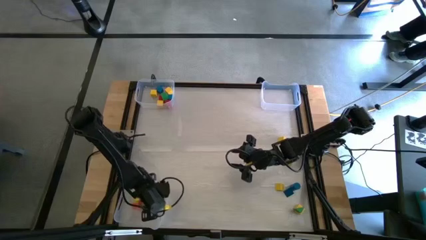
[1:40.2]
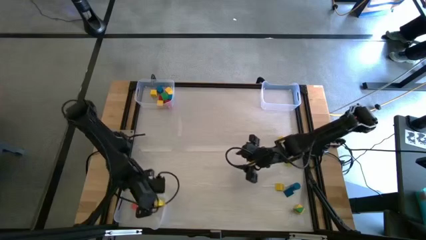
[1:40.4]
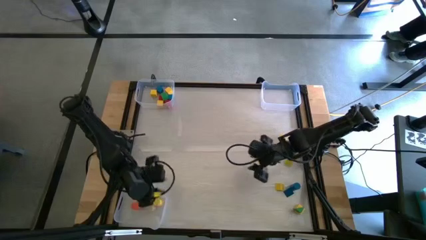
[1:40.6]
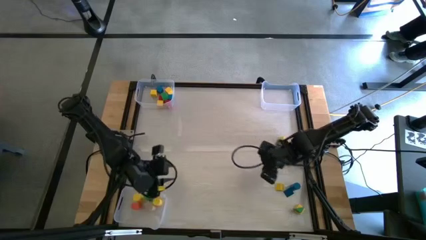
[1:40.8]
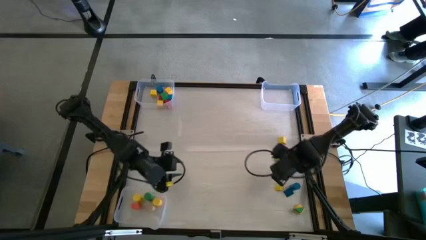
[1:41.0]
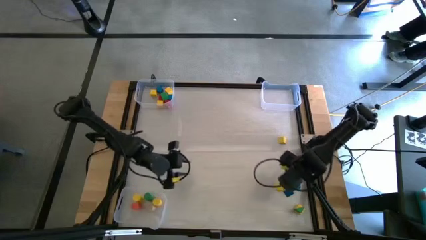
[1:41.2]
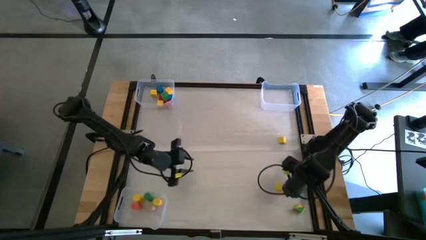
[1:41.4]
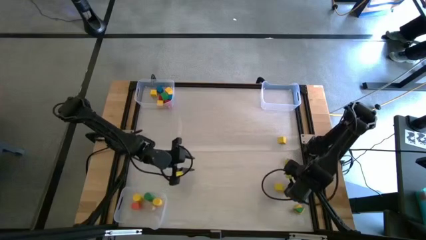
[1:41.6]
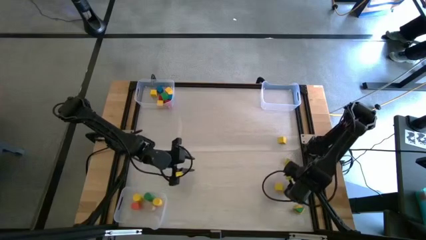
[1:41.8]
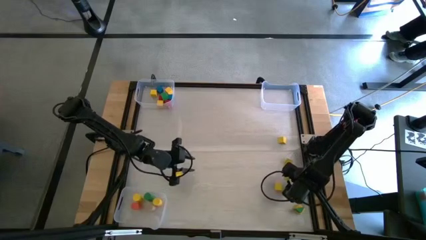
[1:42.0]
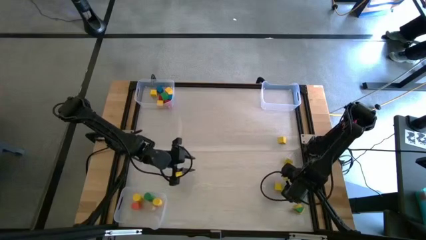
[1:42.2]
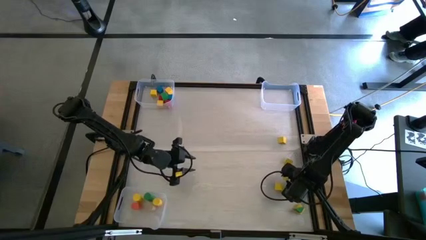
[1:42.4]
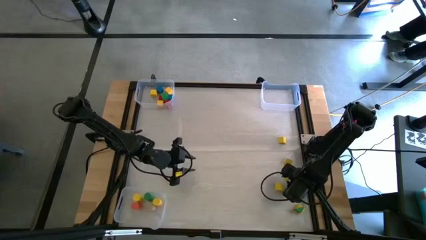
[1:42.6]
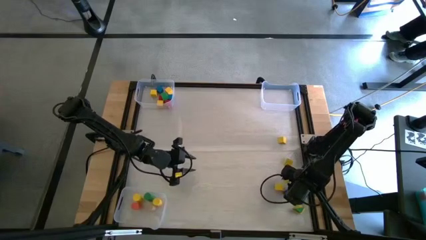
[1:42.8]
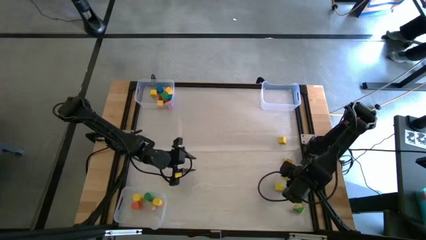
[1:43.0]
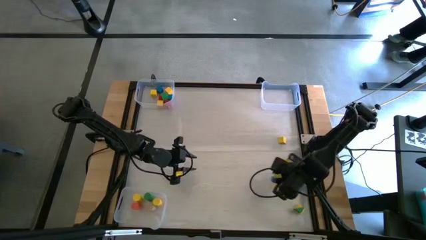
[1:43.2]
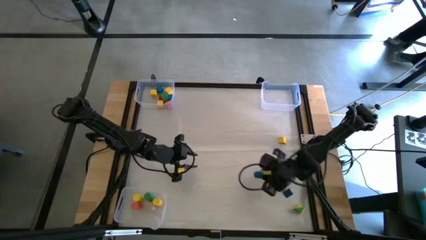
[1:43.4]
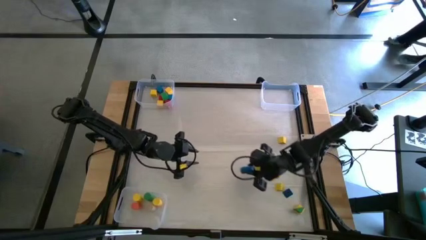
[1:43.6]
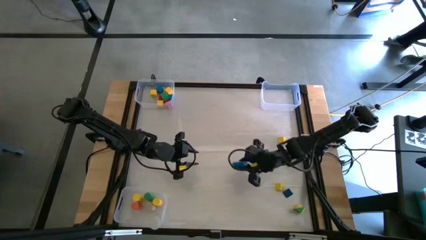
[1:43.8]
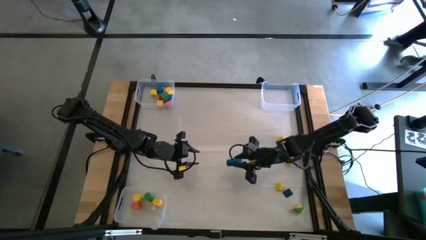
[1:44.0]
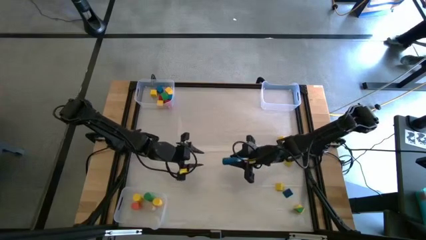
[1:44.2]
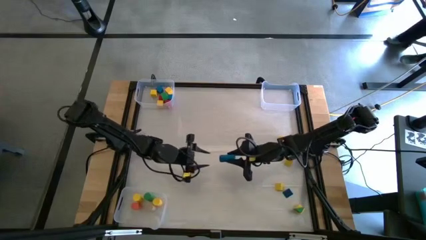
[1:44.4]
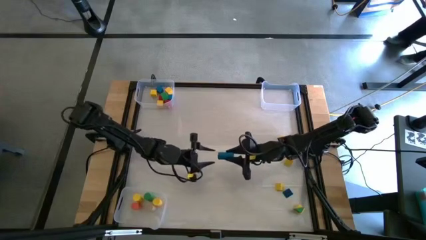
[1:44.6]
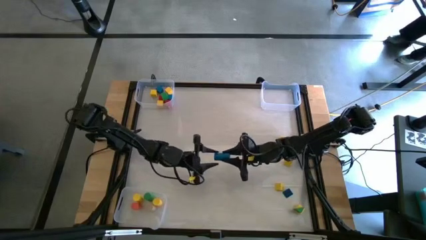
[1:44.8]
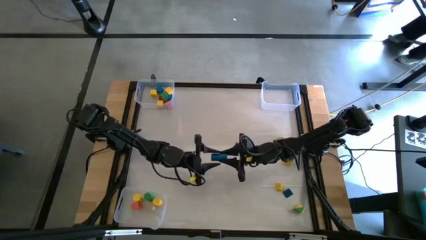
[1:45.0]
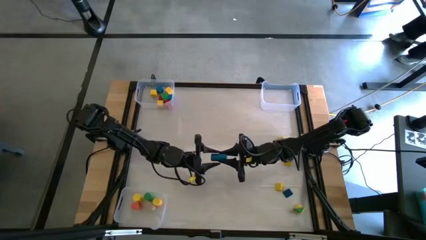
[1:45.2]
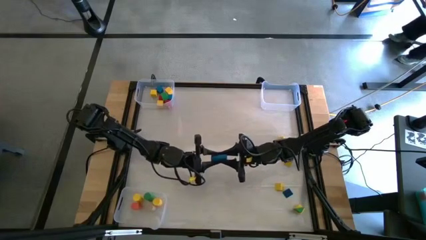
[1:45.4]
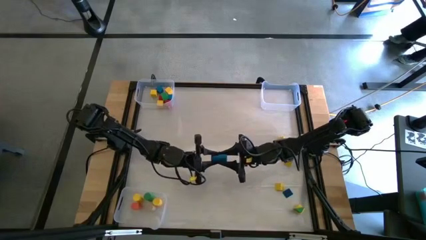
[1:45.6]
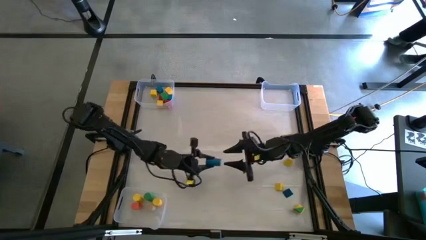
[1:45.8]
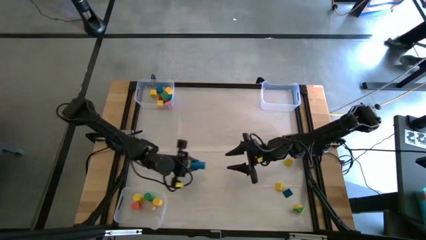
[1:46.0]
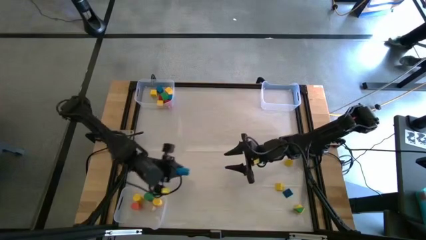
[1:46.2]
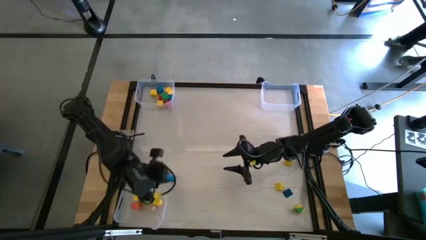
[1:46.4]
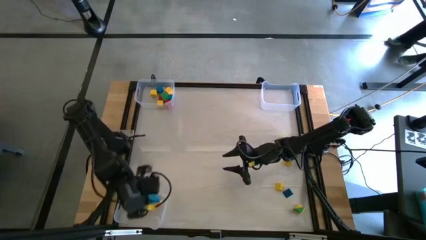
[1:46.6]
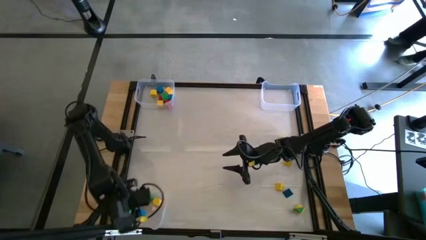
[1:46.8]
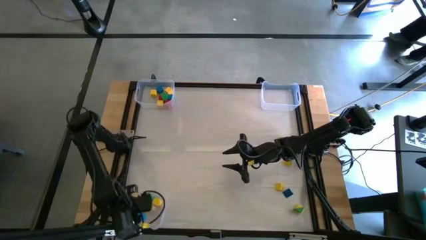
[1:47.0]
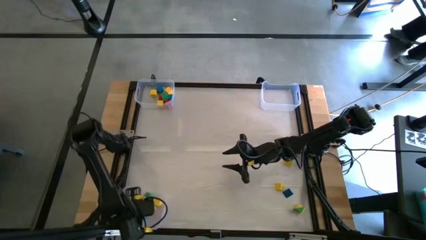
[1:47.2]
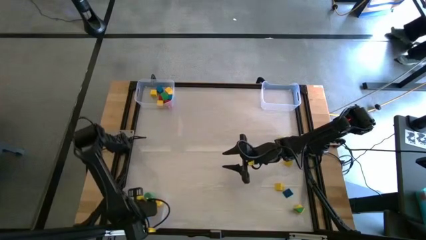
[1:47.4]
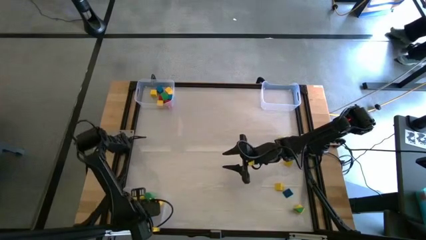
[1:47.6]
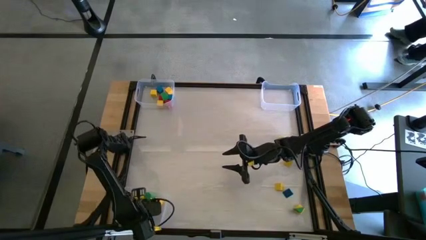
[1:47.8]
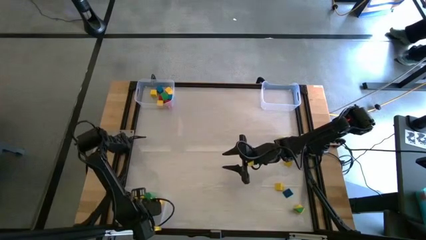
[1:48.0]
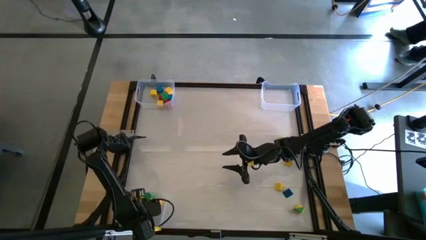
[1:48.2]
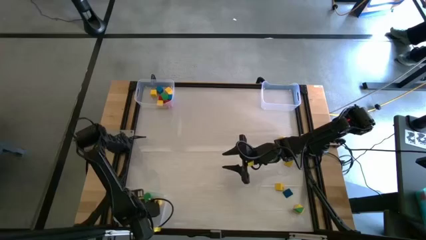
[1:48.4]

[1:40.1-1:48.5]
Task: Sort blocks by size
Put the right blue cylinder block into the bottom transparent bin

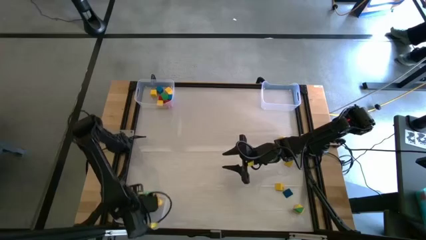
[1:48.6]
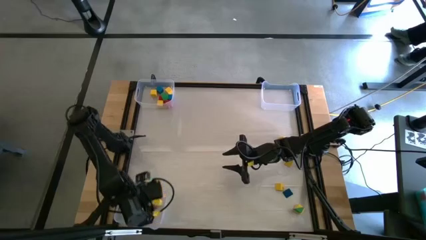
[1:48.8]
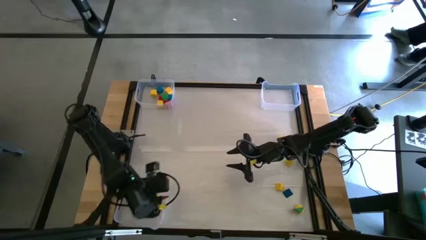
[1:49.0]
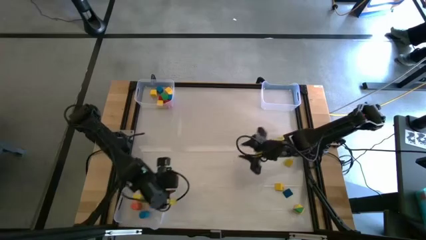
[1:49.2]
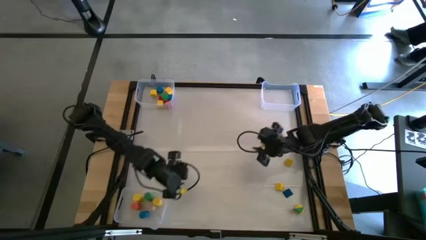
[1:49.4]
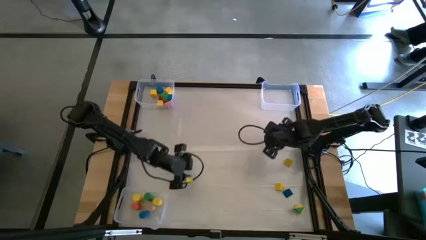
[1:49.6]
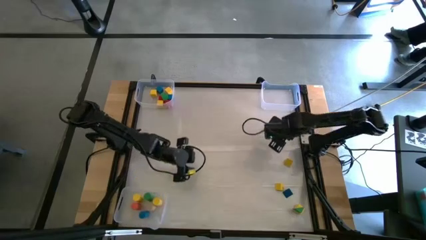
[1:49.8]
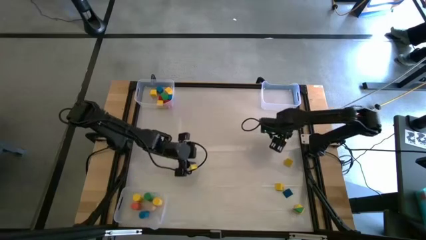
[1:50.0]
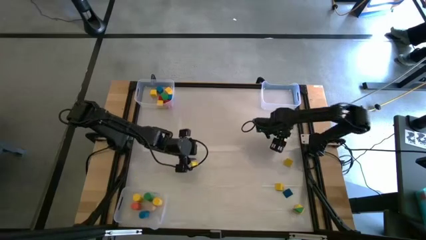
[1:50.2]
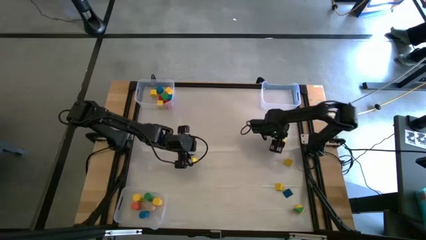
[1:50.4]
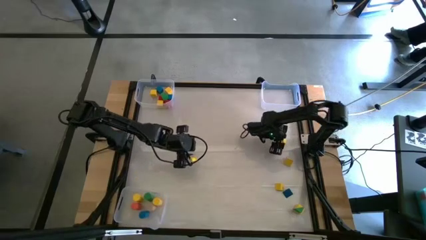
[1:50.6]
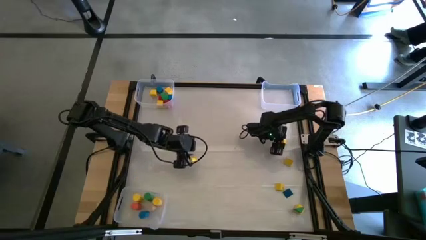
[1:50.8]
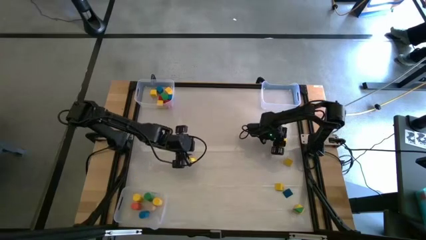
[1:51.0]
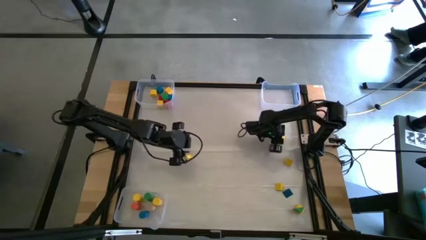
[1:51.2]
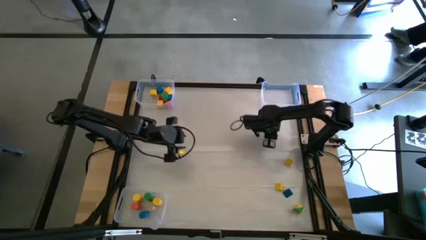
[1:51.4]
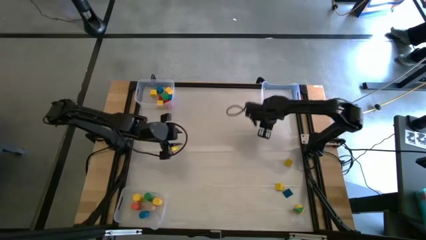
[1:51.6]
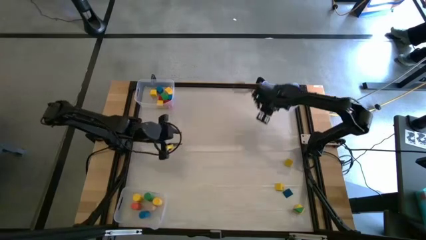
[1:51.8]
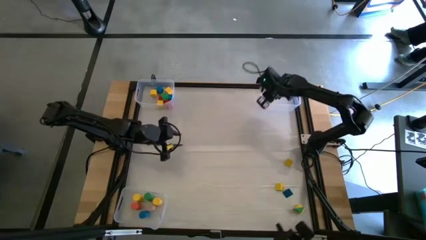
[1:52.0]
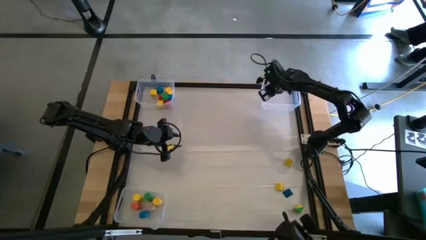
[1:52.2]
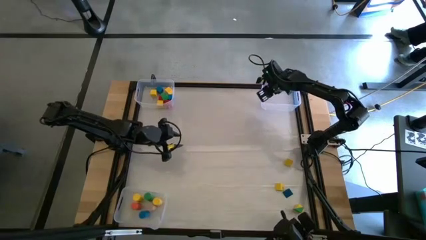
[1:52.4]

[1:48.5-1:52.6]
Put the right yellow triangular prism block into the top right transparent bin

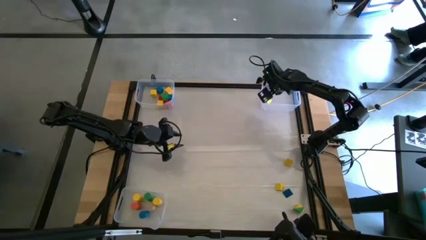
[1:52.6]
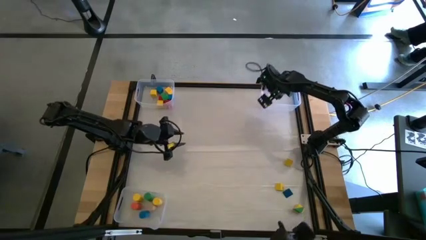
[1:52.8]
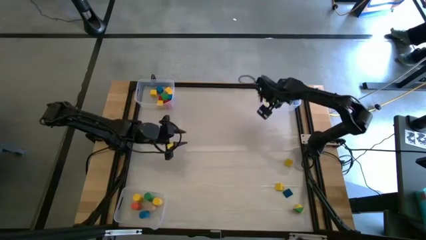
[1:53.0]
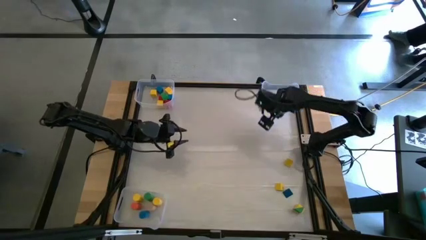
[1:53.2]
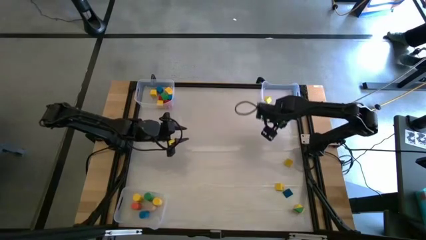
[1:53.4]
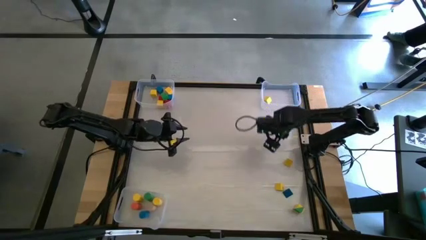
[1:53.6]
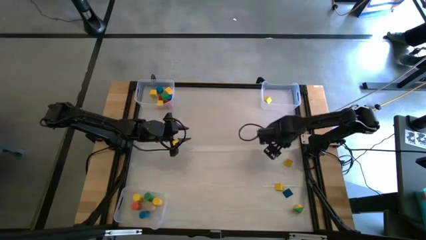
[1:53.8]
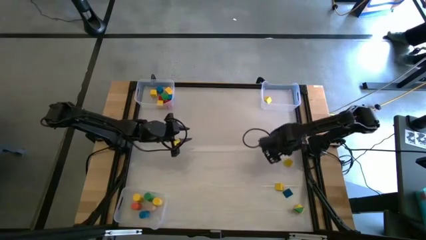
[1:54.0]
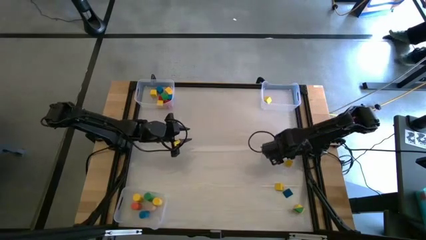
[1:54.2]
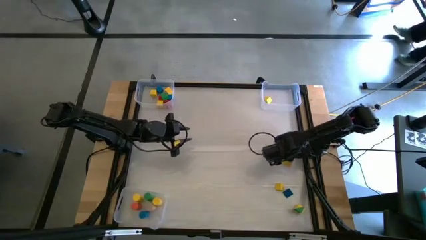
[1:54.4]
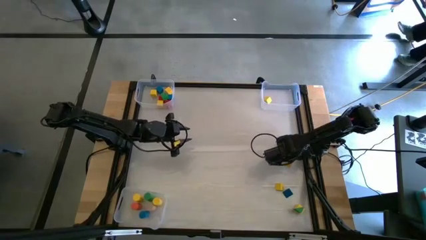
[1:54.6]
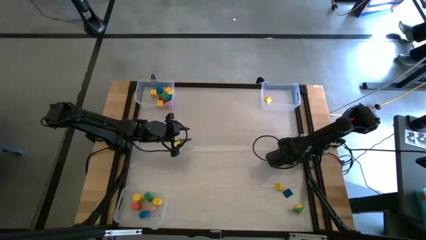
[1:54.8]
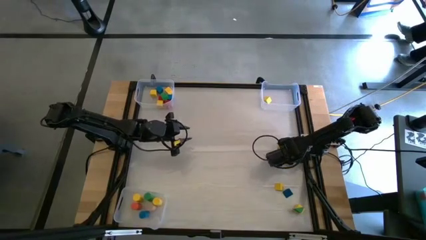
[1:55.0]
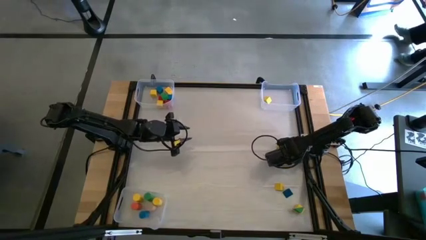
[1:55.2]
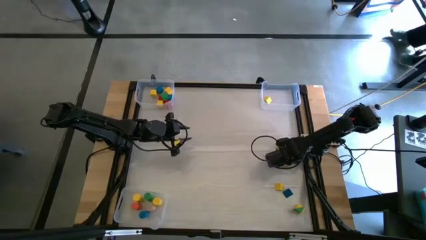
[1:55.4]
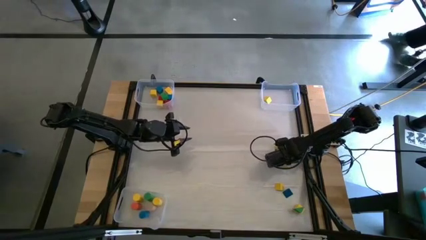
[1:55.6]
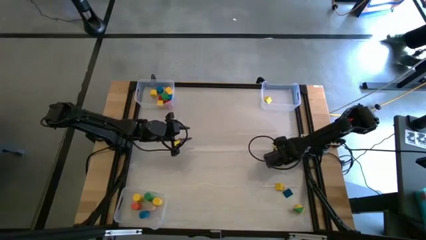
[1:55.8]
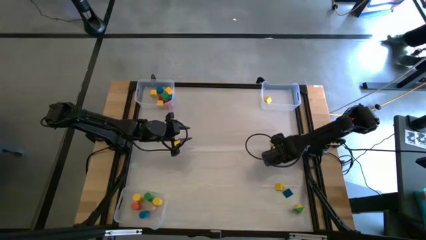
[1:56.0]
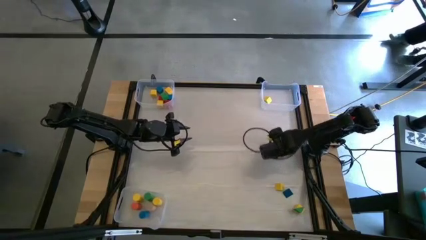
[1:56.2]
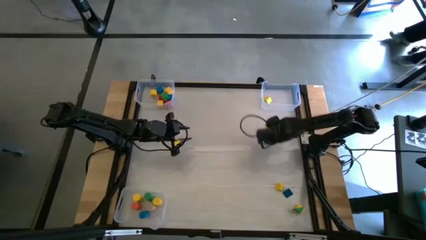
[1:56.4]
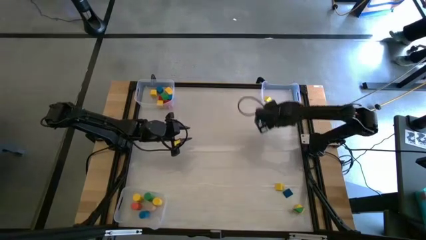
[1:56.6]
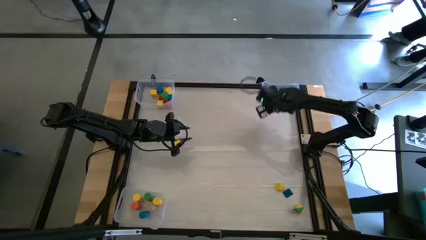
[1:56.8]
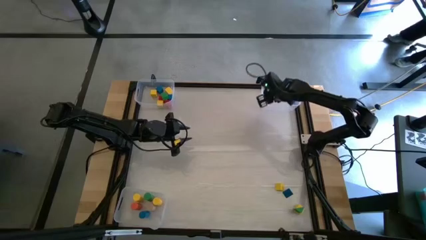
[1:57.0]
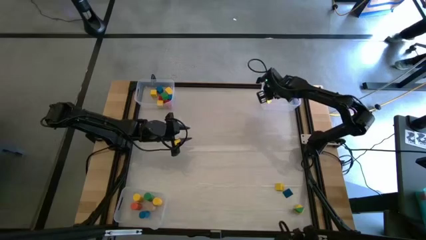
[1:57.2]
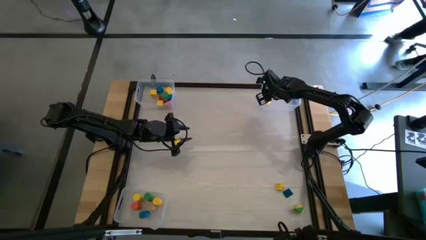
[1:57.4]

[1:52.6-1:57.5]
Put the right yellow triangular prism block into the top right transparent bin
